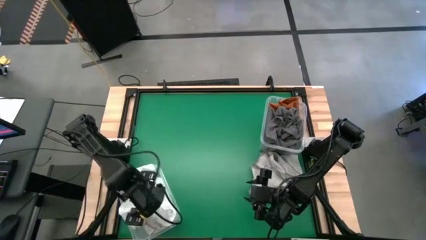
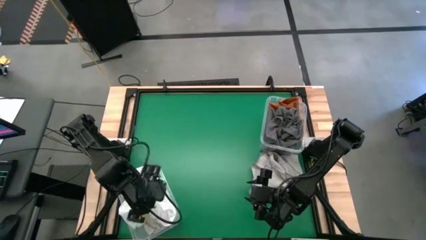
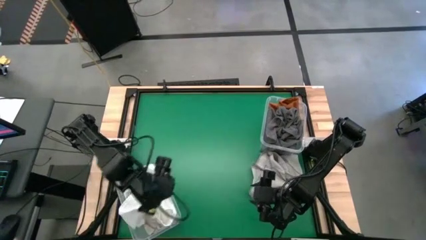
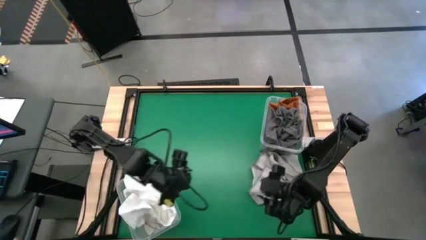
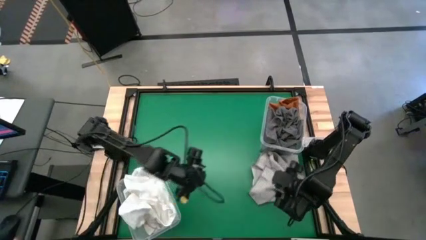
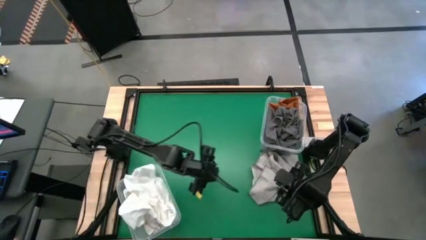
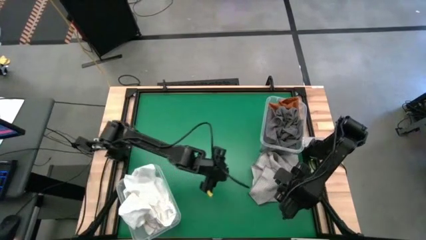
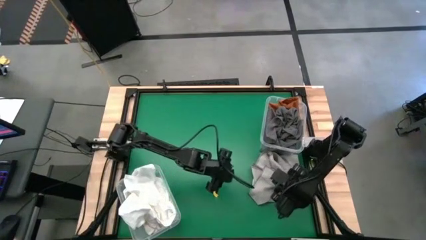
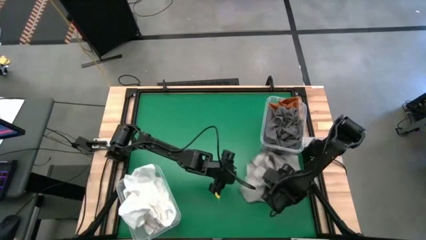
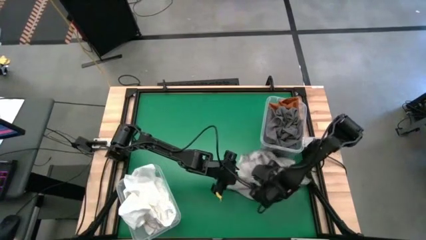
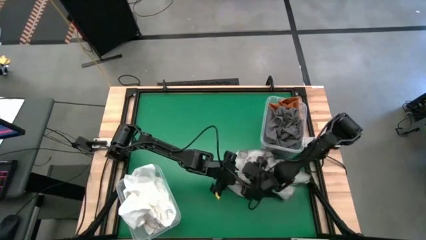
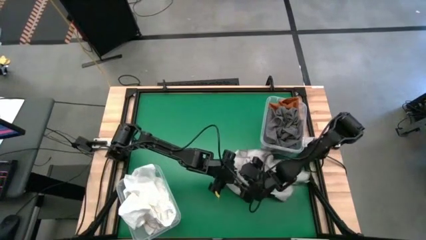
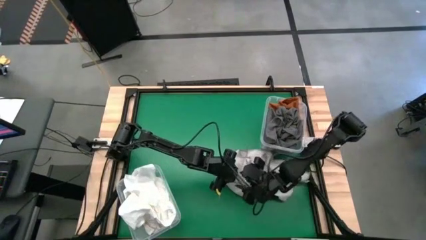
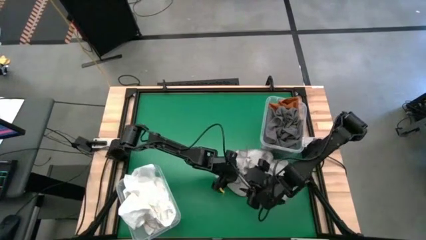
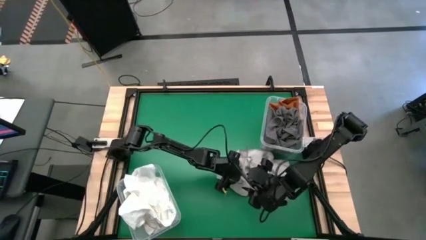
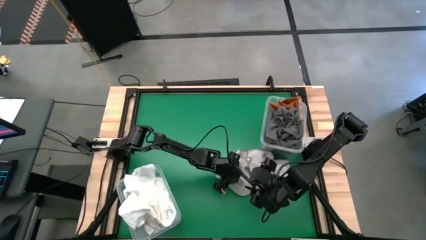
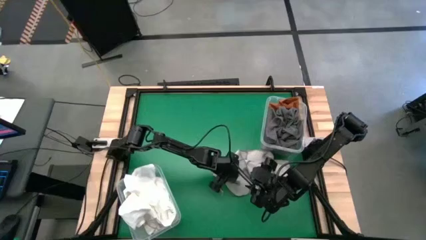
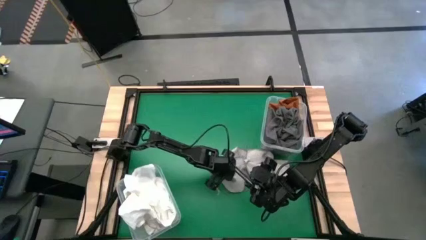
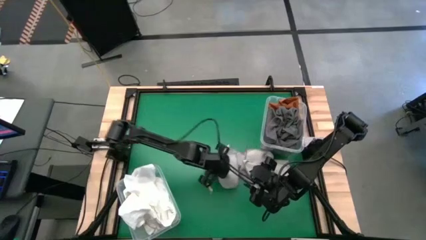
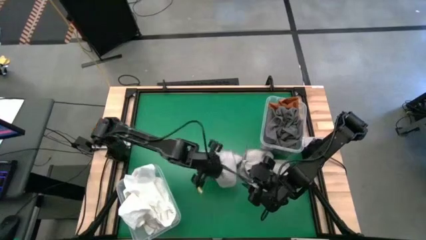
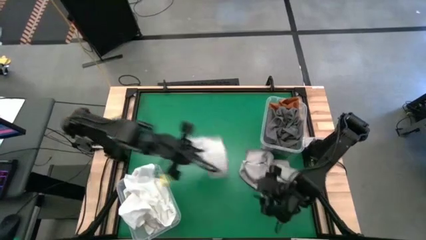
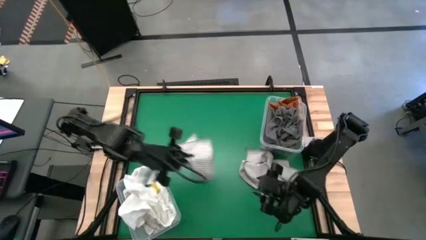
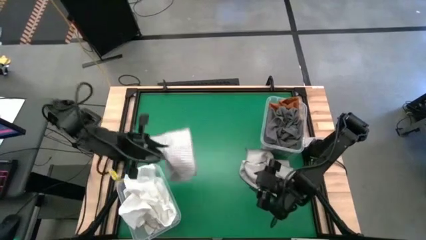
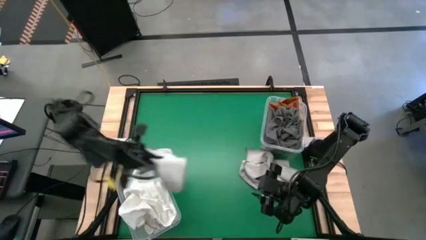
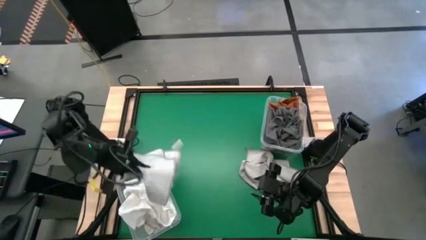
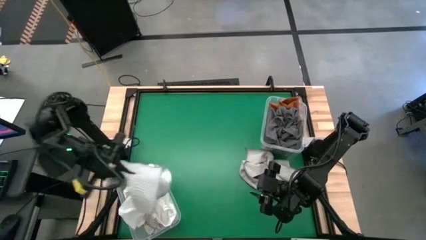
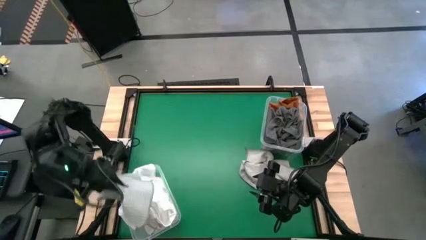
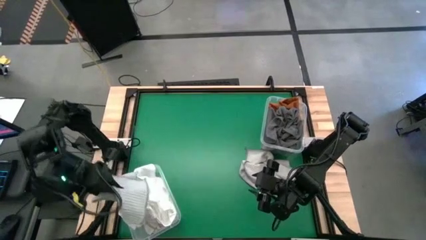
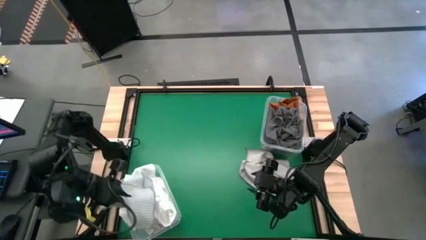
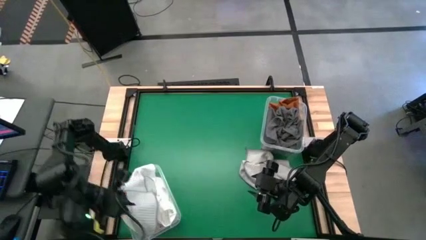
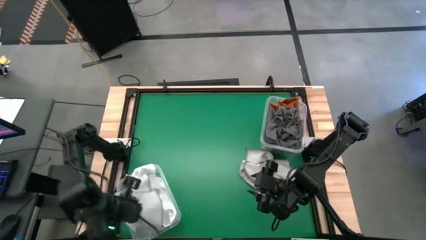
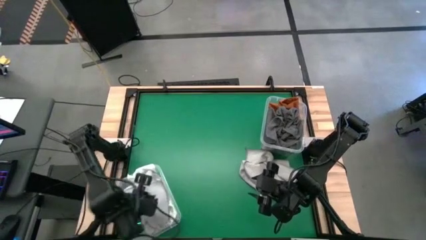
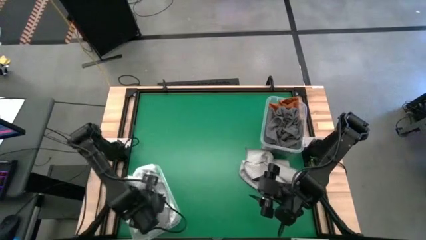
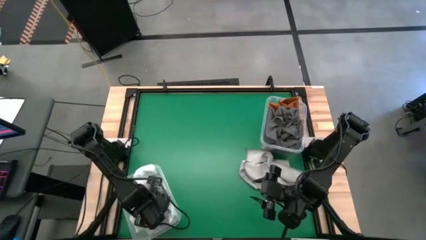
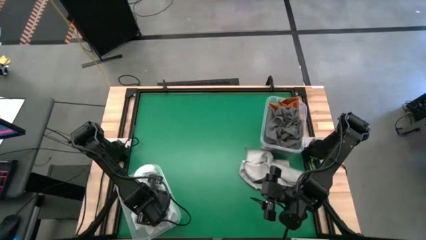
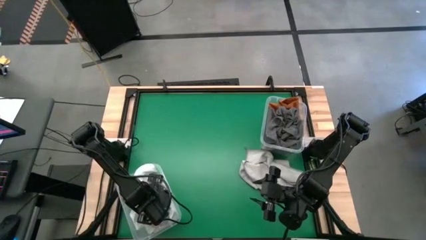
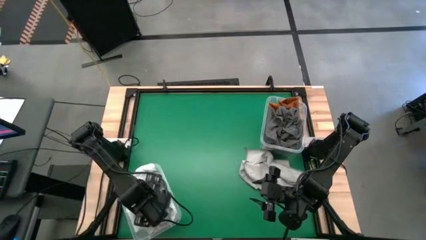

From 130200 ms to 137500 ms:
Task: Sort towels by color in basket
Put the light gray microfiber towel into the bottom transparent bin

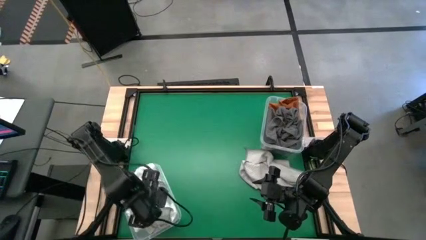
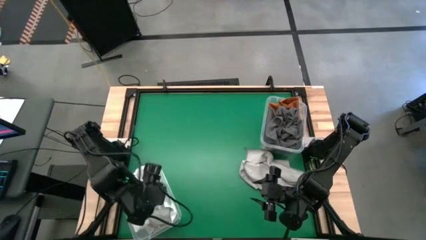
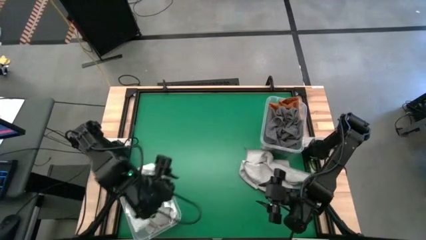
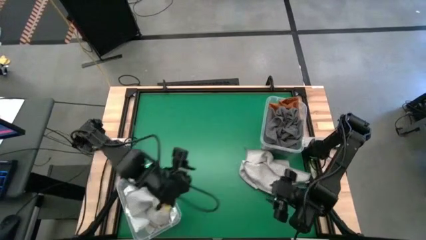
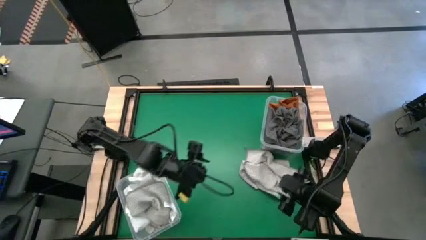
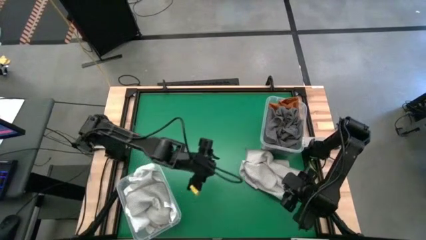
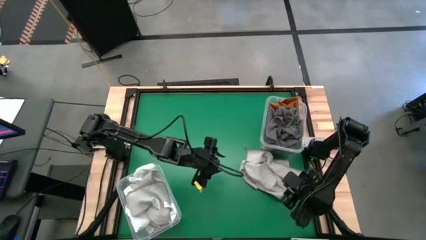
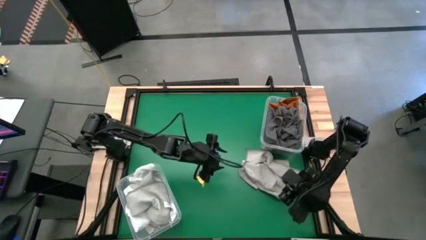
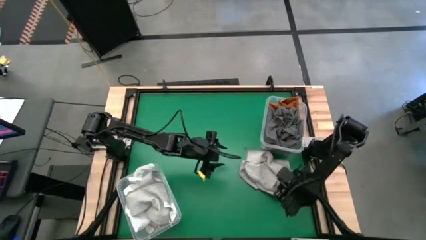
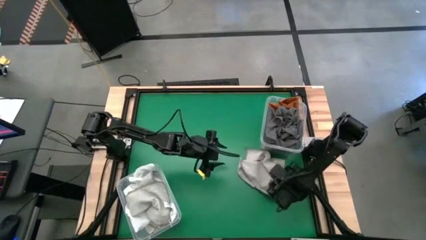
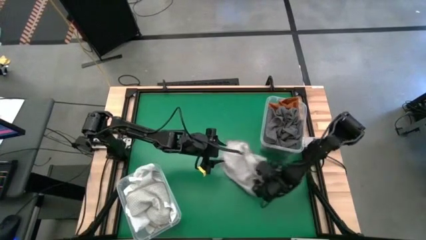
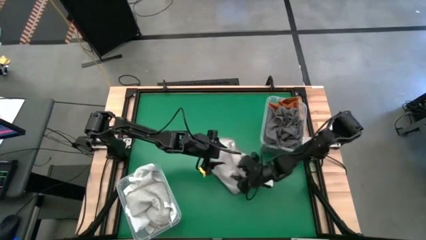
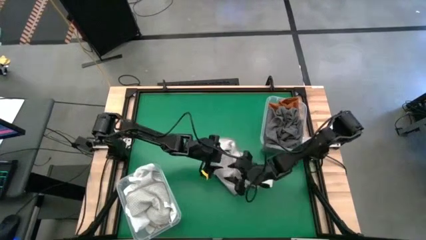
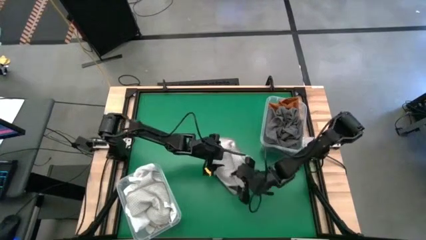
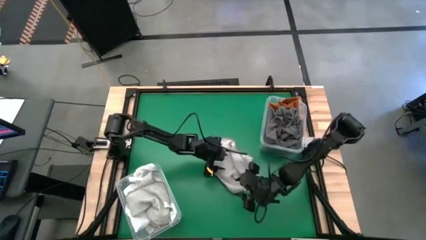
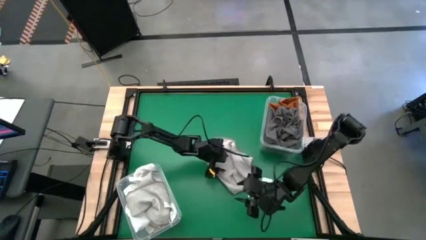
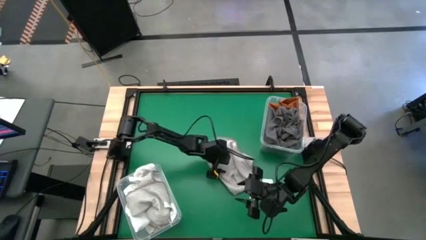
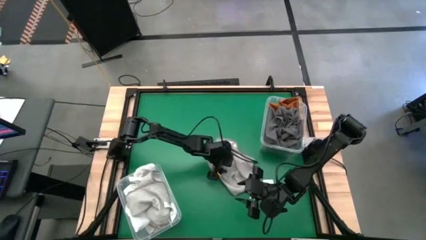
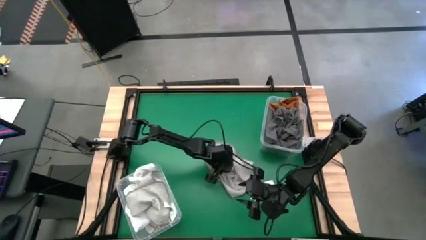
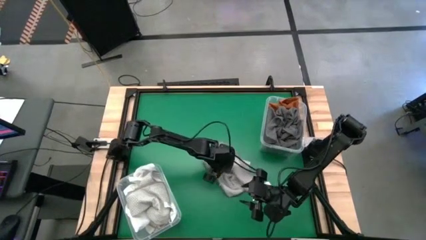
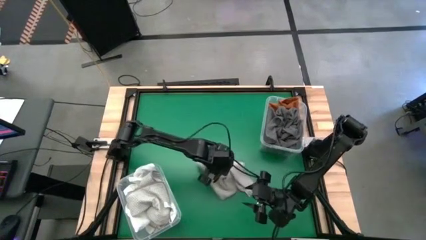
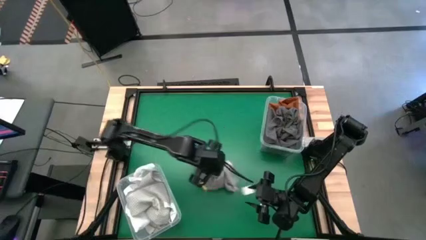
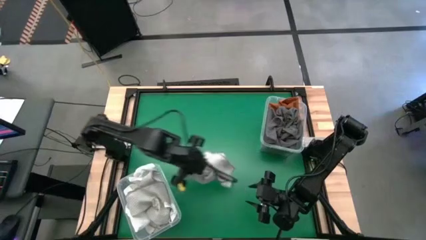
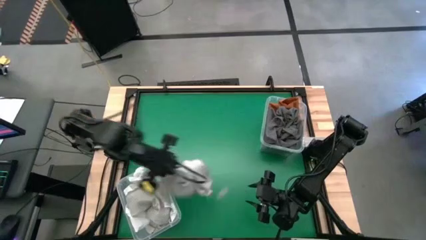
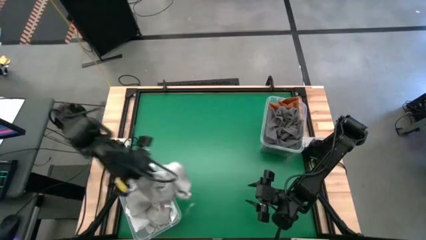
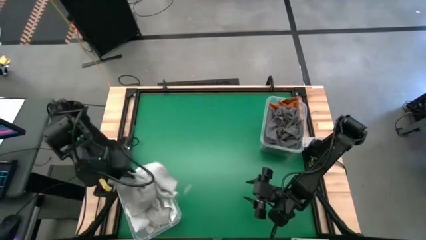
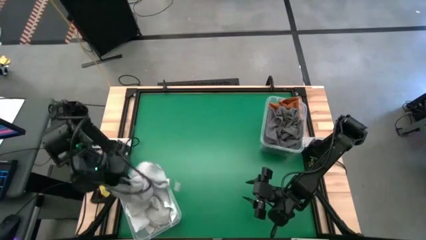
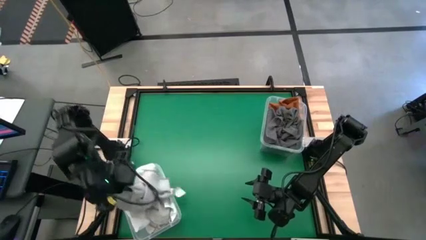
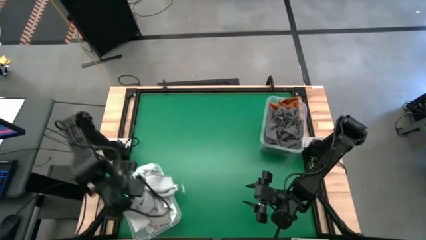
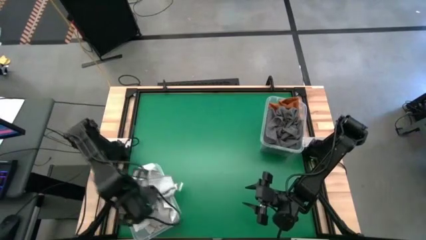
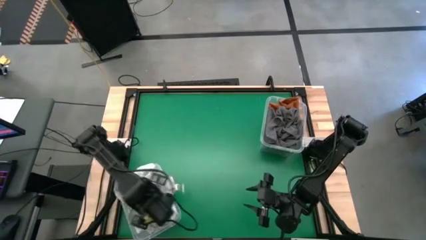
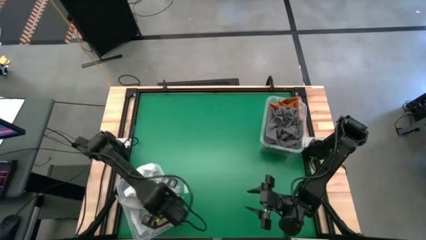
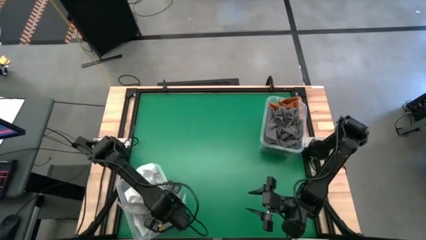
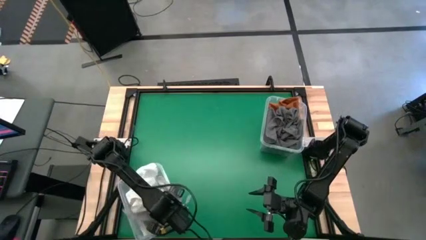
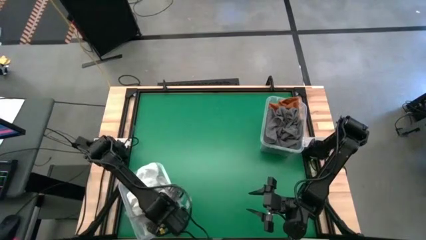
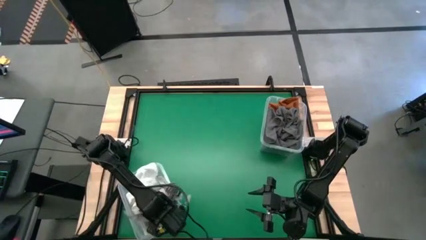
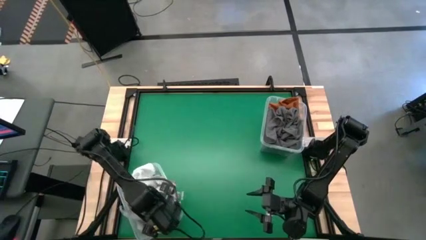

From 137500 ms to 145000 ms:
Put the light gray microfiber towel into the bottom transparent bin
